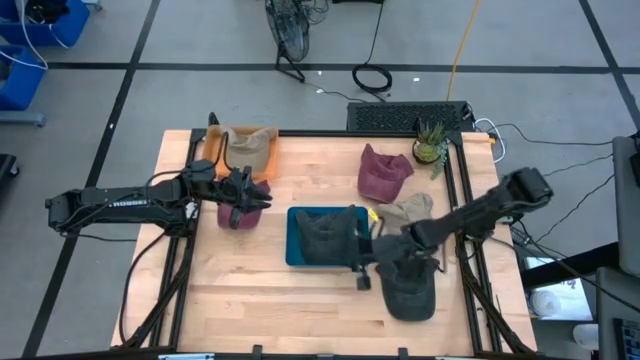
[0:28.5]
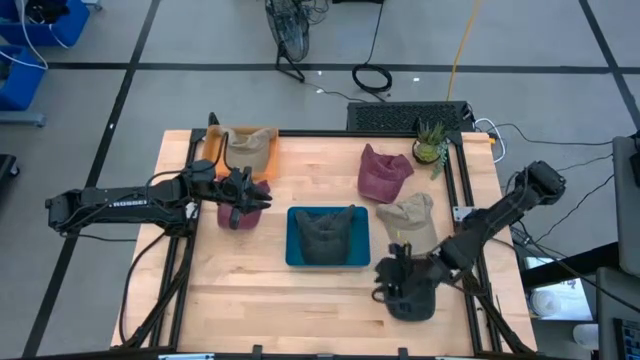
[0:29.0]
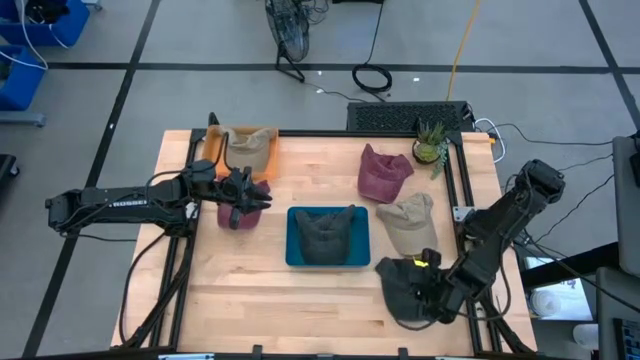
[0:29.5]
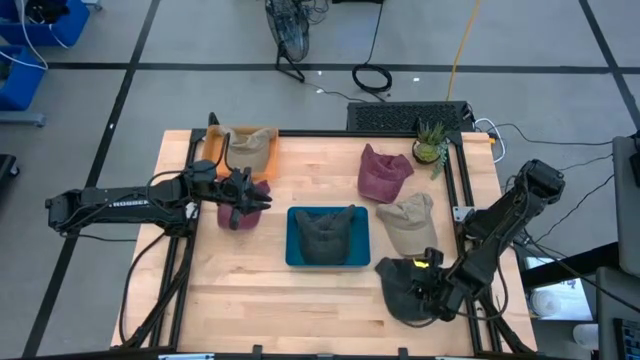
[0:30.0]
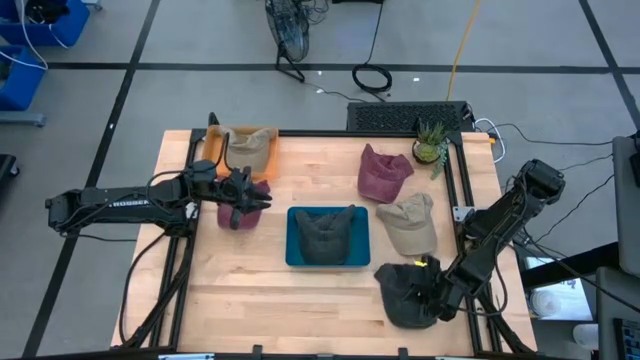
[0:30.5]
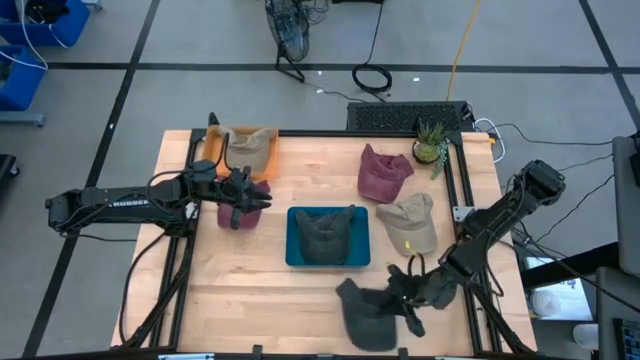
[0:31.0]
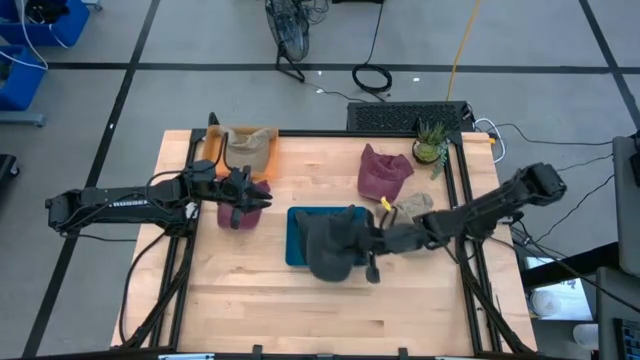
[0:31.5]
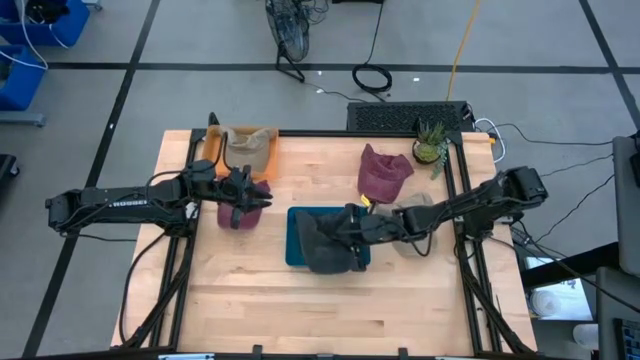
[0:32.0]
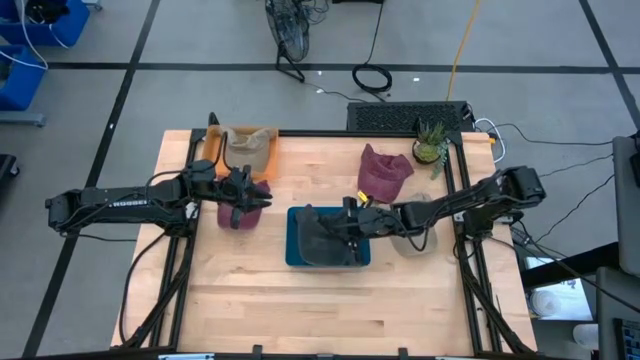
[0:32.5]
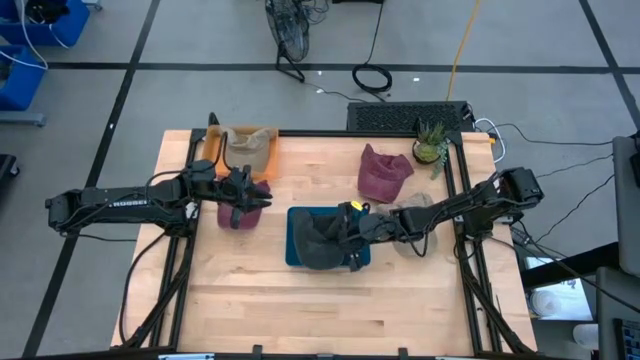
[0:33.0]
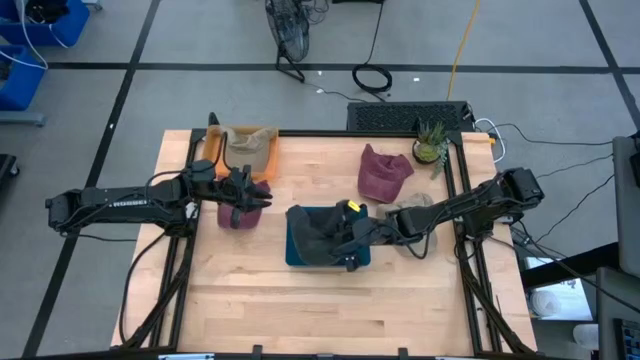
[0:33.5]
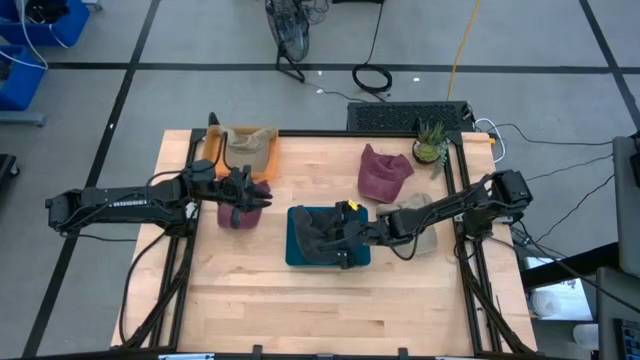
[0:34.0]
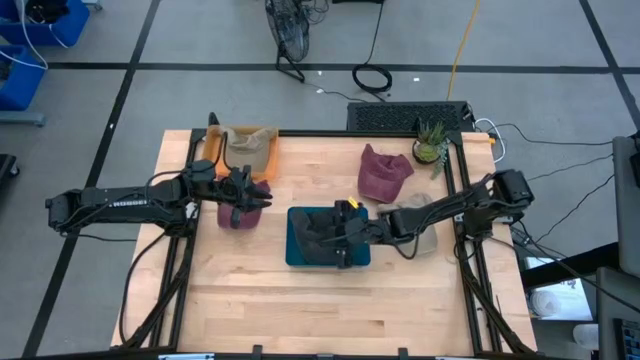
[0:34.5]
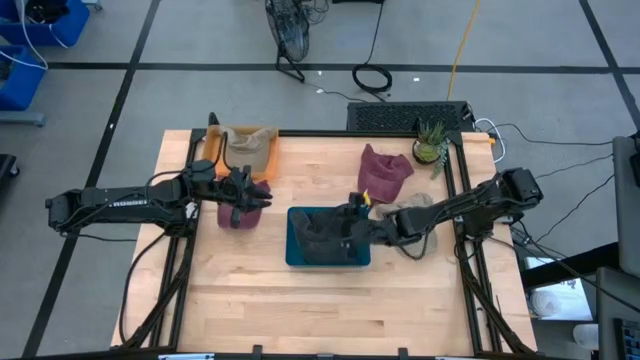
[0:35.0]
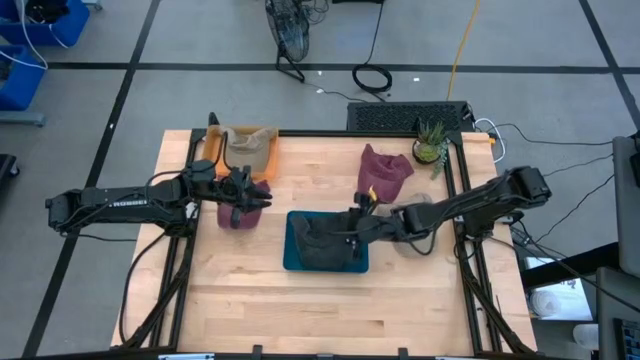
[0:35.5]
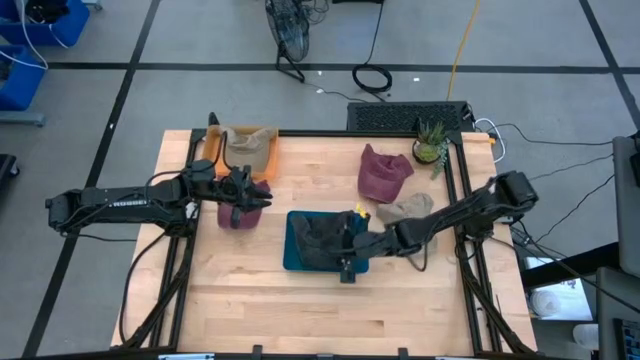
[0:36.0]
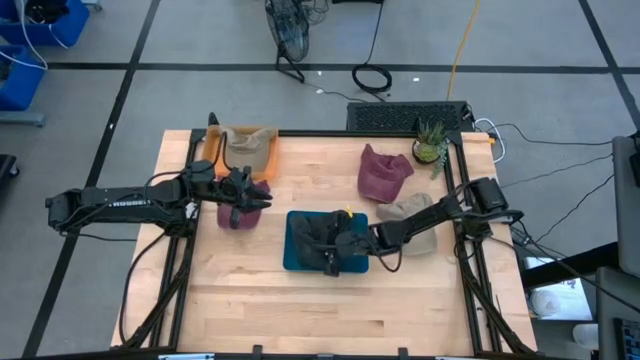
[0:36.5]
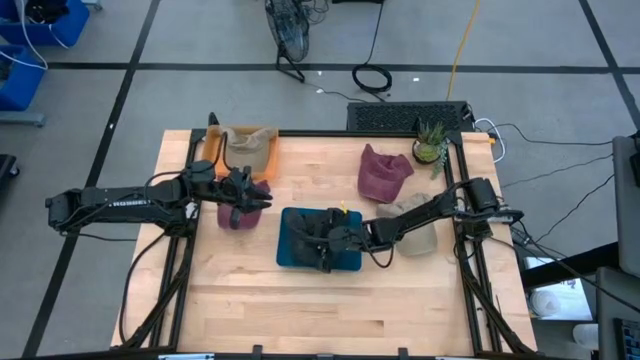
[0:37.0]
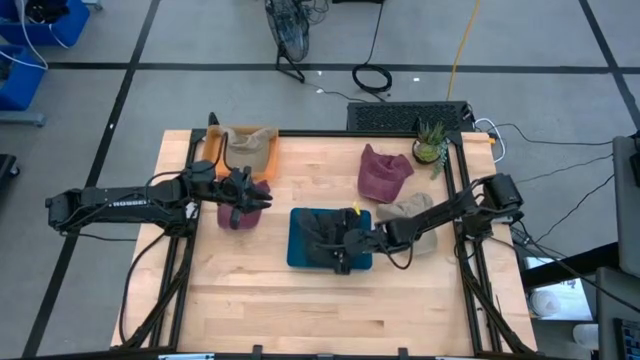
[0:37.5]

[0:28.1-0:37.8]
Task: Pick & Place hat
Put the black cap into the blue bin

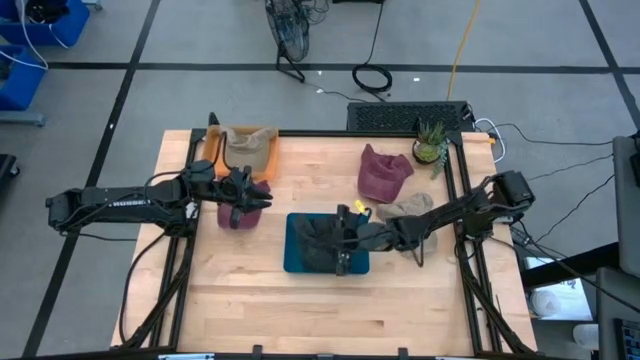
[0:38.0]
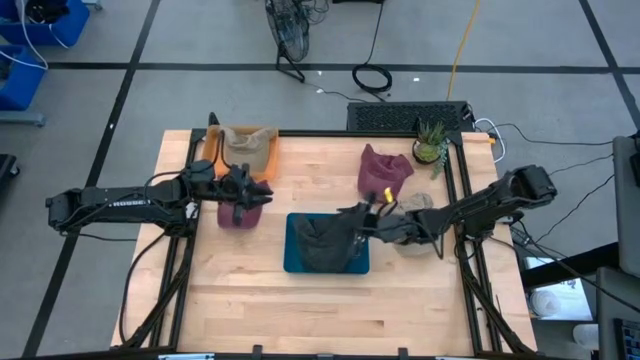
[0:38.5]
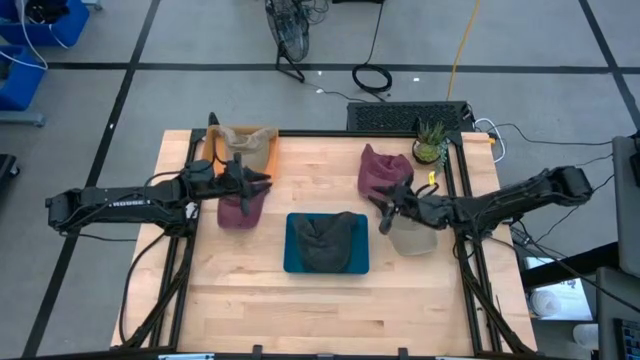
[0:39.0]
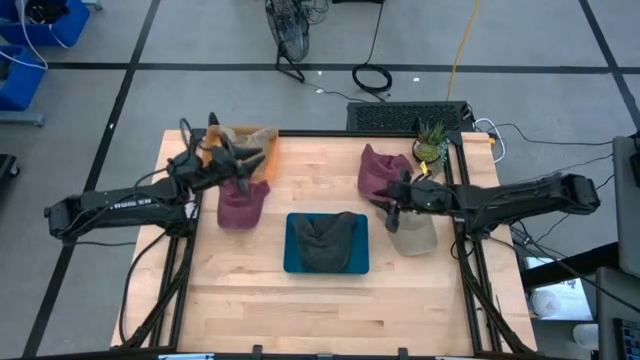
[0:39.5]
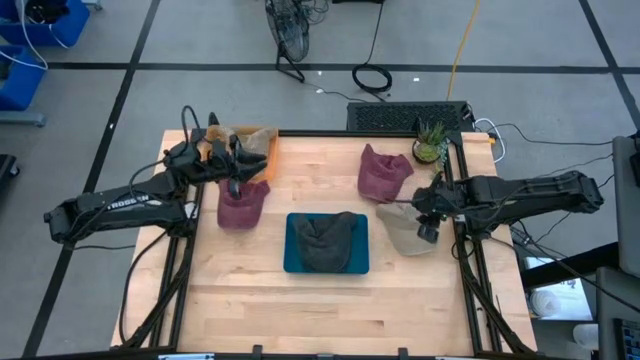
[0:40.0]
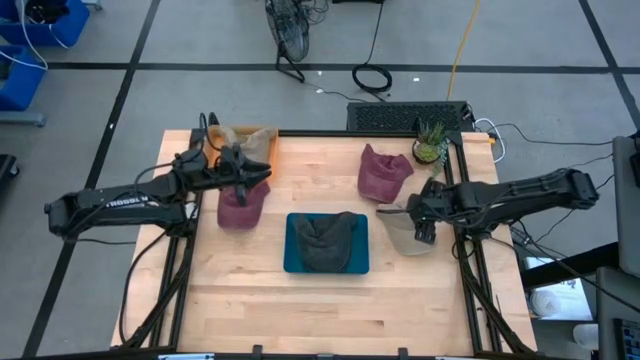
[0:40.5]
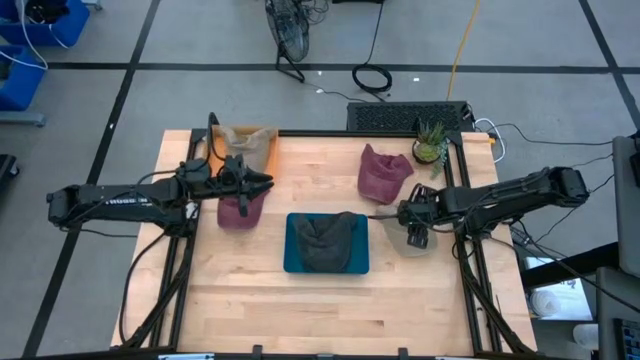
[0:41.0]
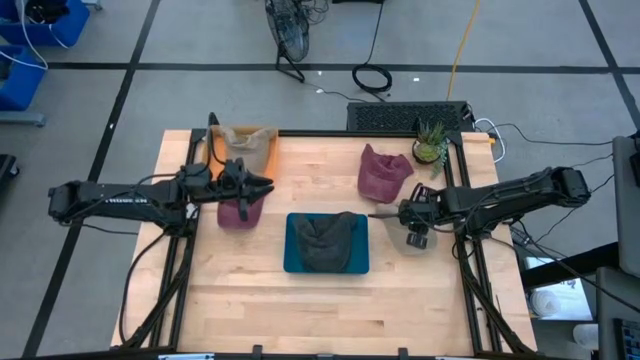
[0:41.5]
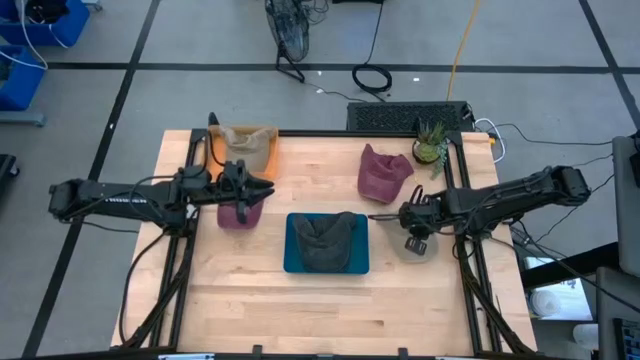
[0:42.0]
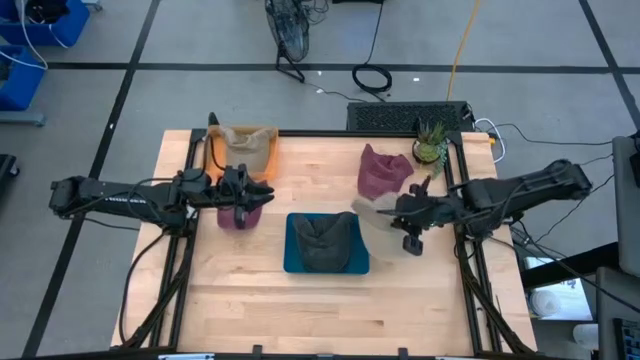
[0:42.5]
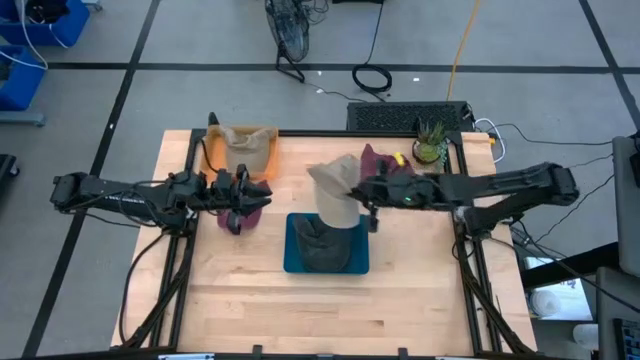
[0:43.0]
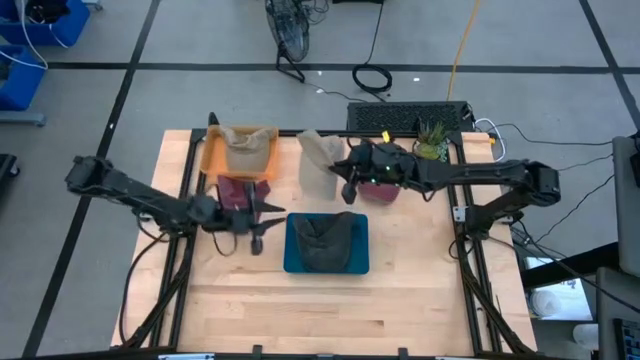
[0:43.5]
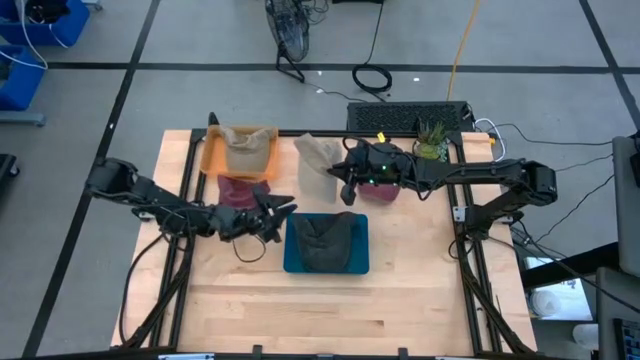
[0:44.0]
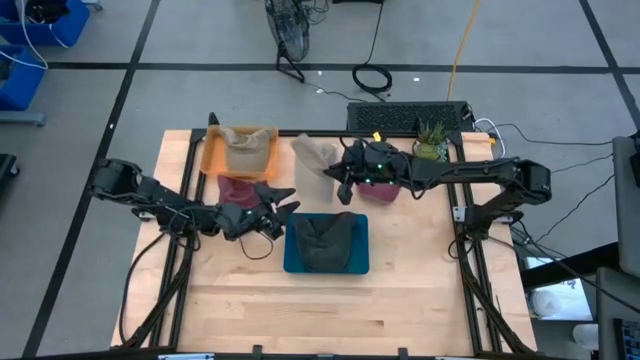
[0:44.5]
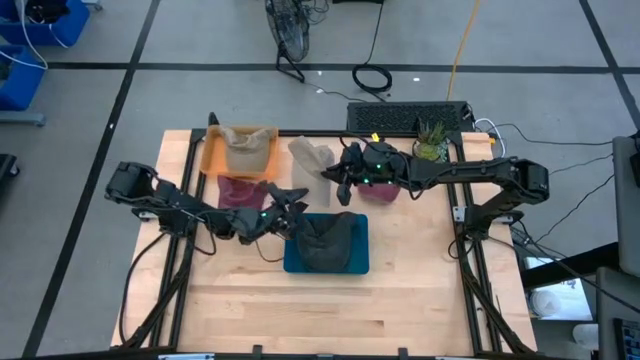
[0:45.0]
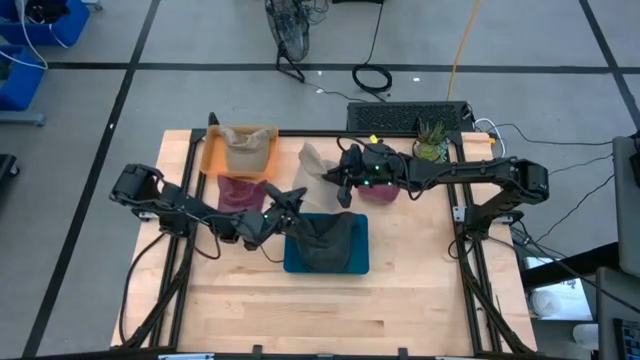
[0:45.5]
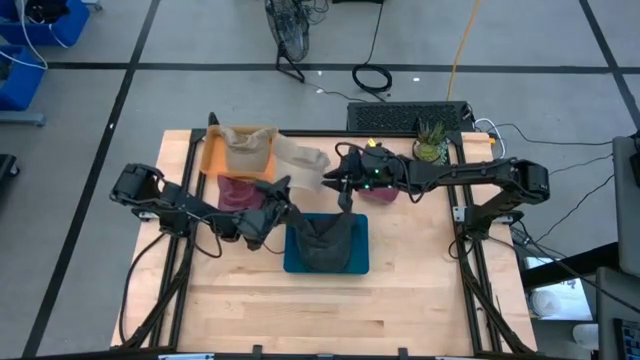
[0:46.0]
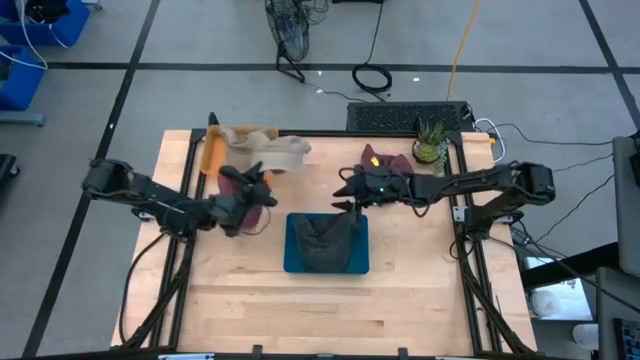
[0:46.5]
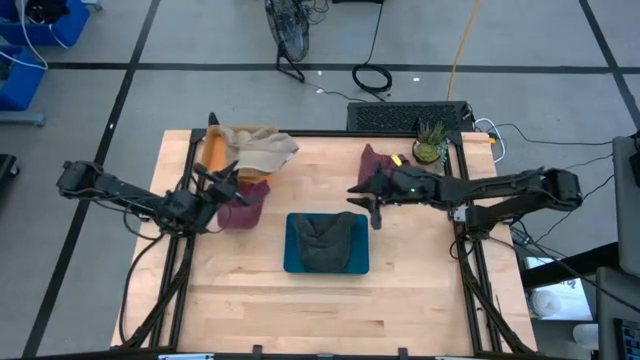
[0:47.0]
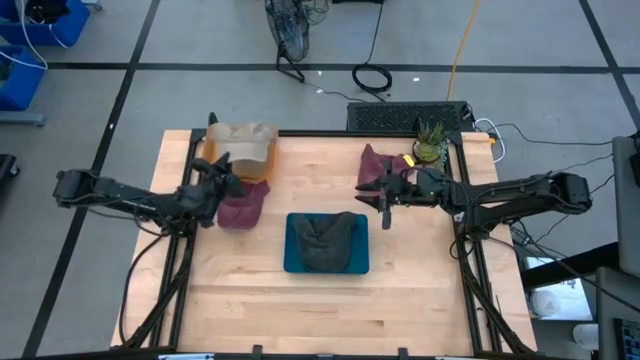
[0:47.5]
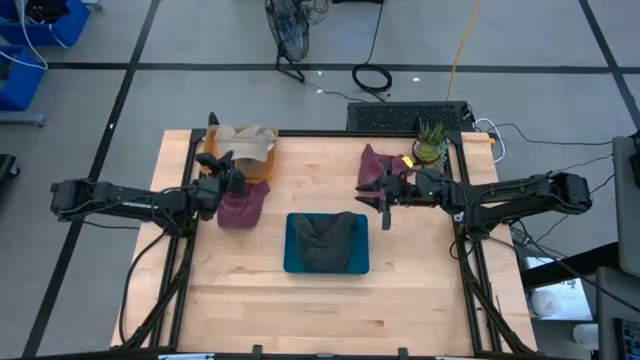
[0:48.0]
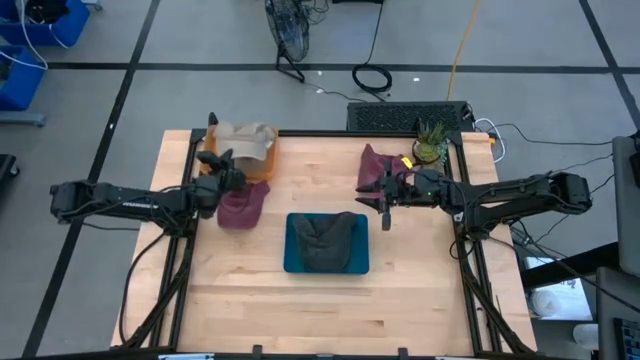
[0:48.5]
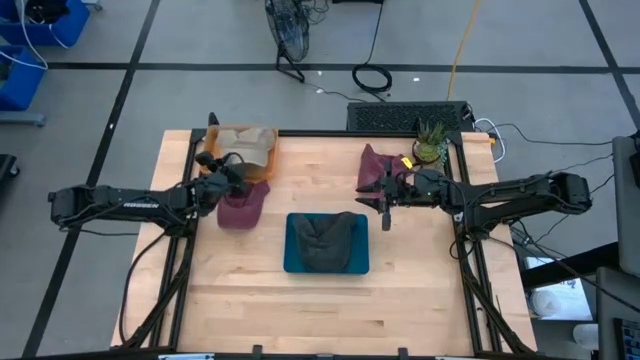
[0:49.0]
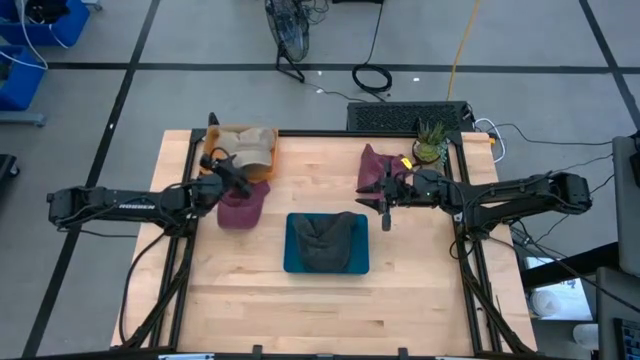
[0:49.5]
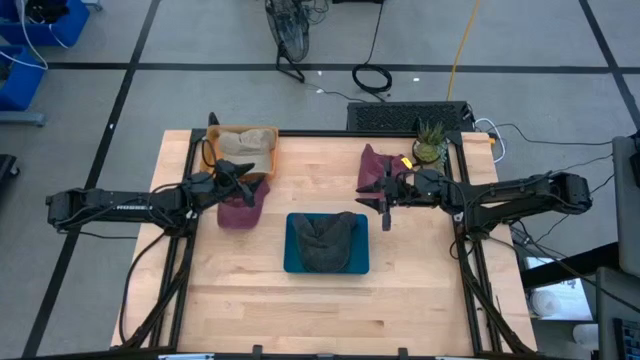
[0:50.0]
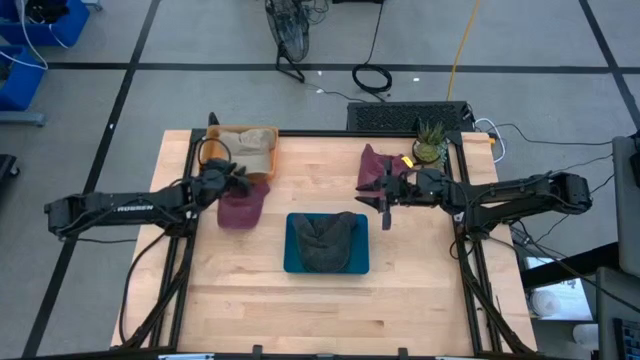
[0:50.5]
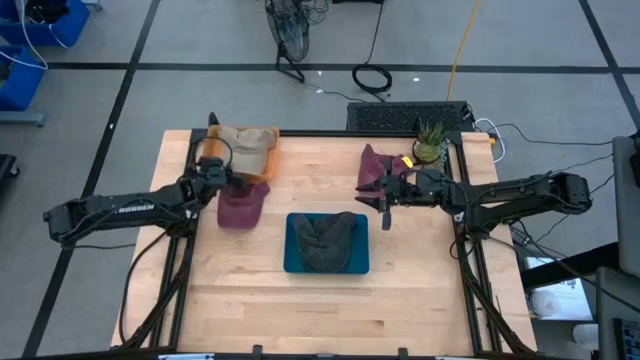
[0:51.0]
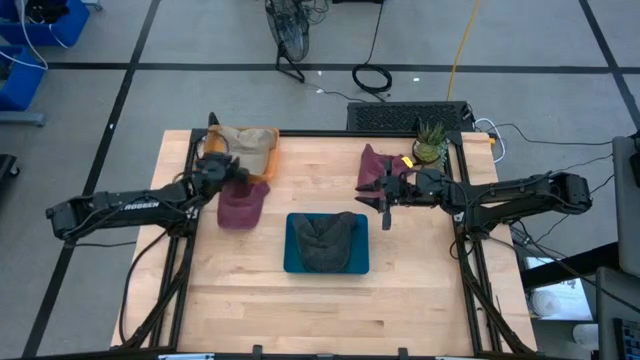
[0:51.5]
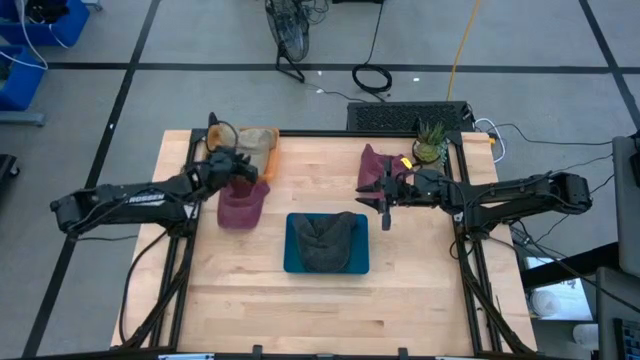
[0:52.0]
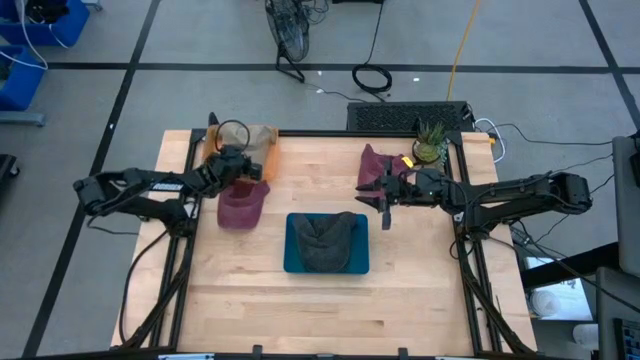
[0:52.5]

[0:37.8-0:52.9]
Put the brown cap into the orange bin
